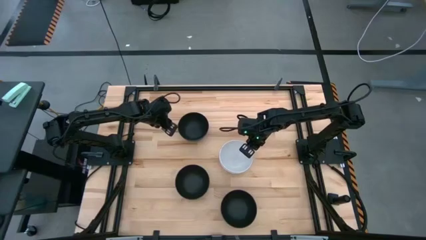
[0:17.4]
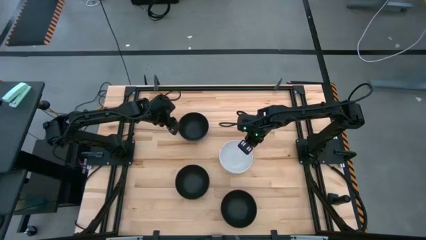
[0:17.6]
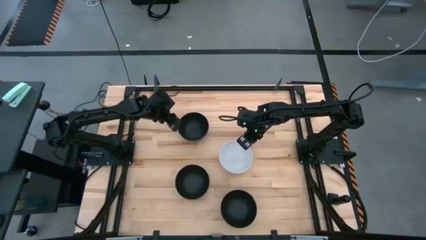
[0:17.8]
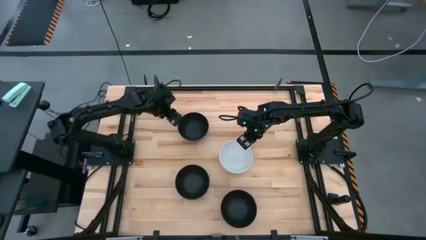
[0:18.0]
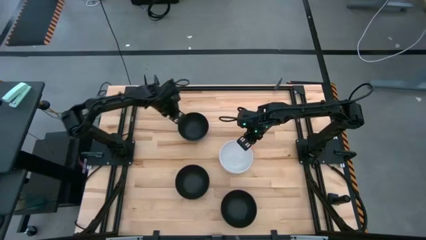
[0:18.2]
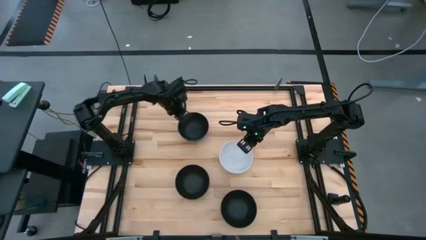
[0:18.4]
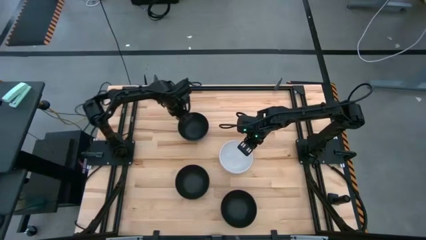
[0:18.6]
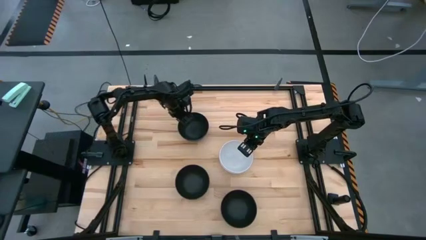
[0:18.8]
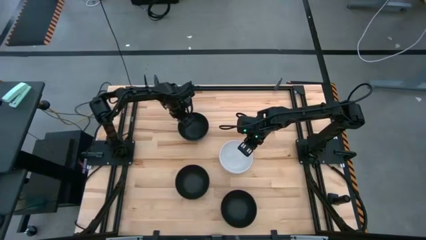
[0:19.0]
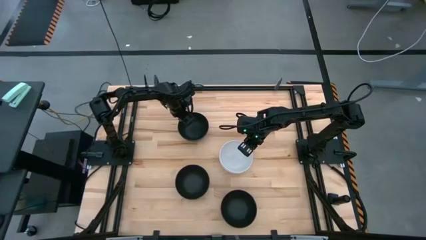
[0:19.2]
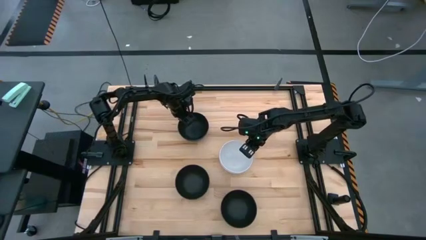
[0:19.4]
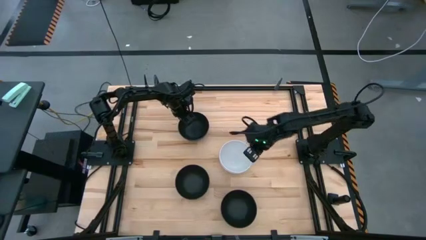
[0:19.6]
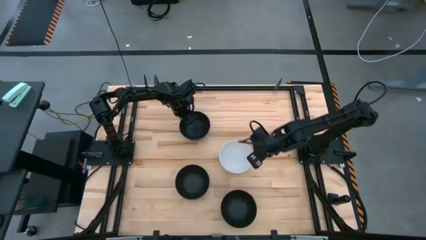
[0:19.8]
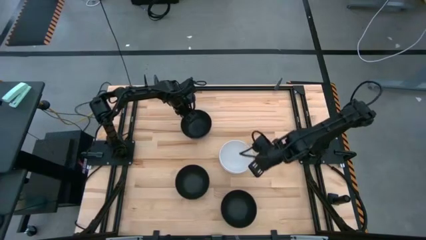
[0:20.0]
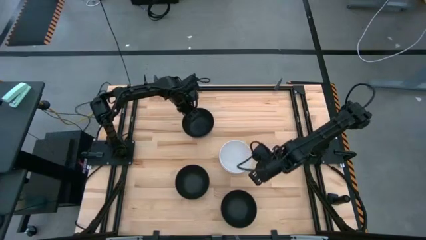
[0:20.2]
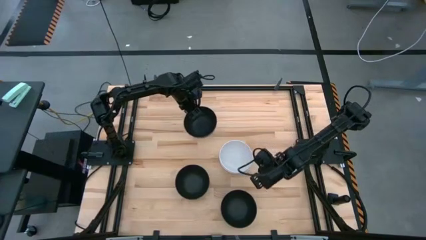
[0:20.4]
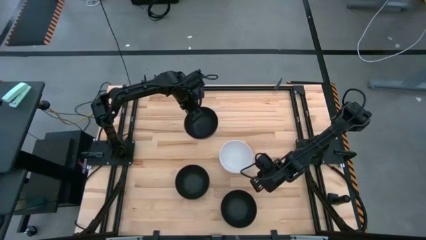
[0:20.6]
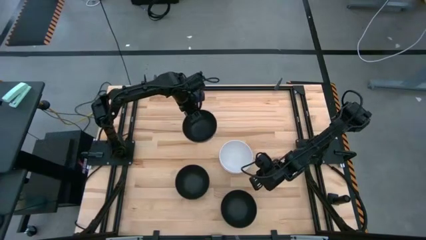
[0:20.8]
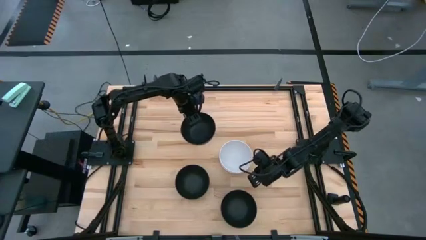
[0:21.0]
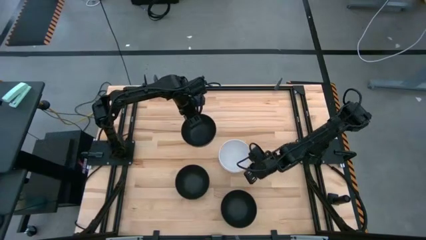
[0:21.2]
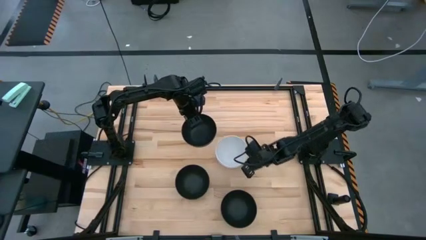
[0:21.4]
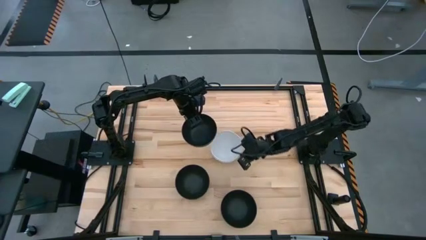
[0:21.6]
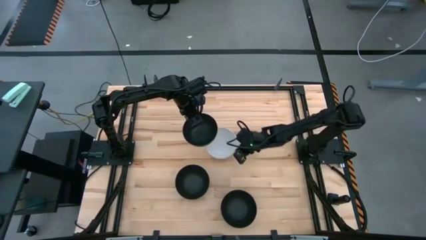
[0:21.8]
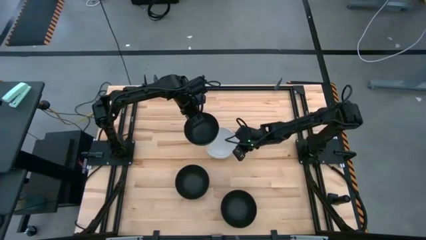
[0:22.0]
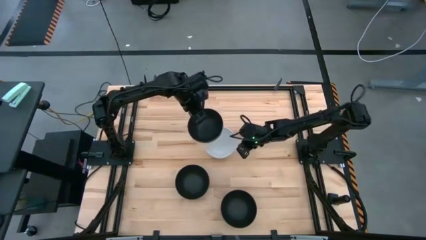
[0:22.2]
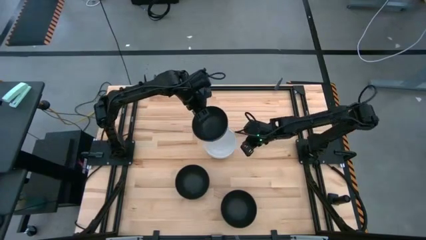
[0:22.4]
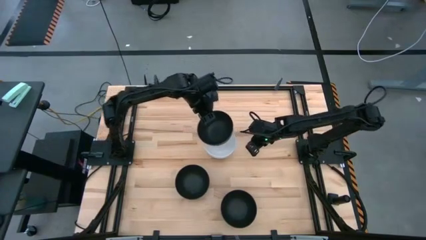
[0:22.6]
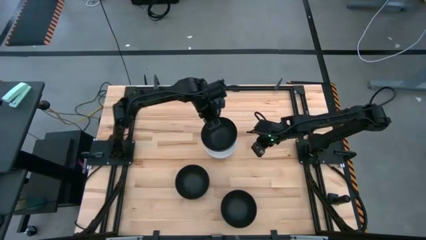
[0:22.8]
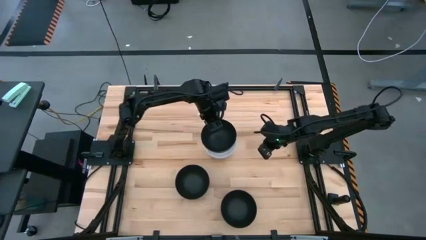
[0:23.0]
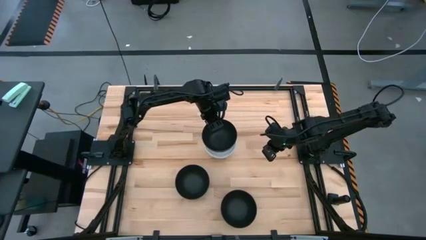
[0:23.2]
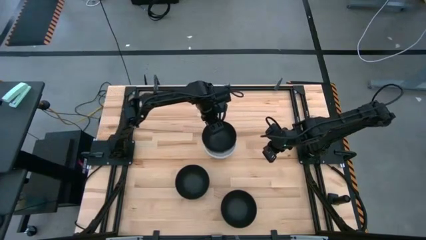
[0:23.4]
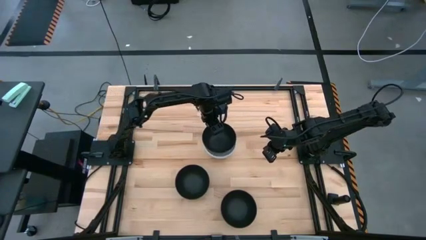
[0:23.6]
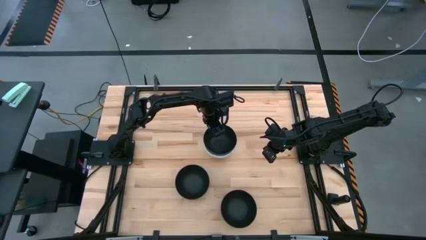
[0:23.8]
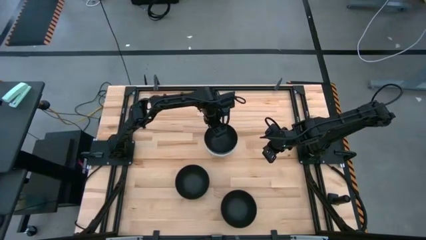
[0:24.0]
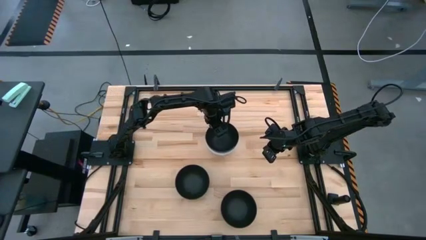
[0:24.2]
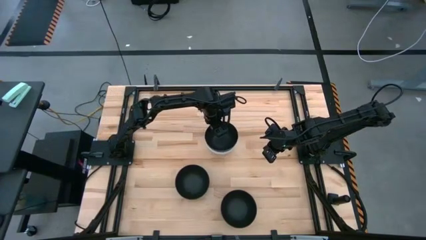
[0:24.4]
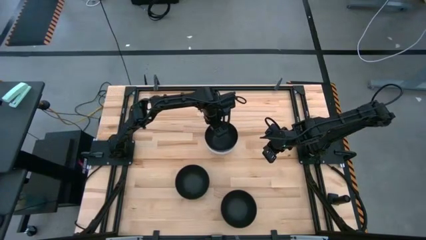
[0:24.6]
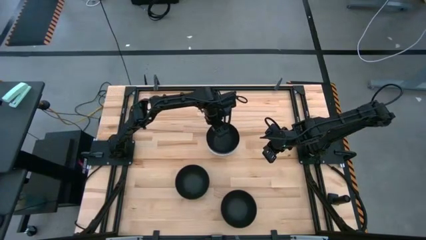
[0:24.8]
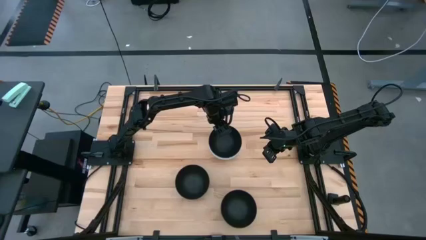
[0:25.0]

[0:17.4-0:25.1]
Task: Nest bowls inside each other
Stack the top left black bowl on the white bowl

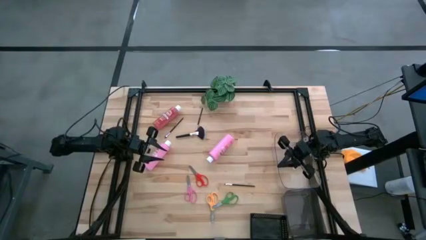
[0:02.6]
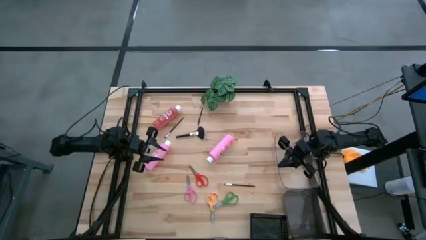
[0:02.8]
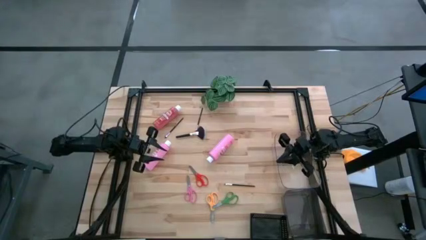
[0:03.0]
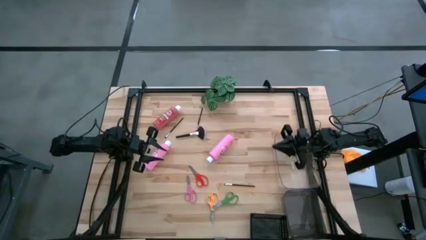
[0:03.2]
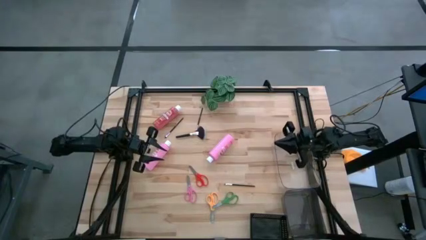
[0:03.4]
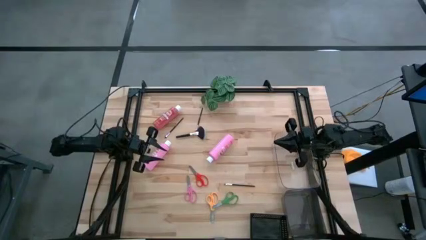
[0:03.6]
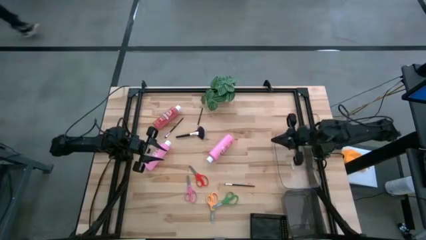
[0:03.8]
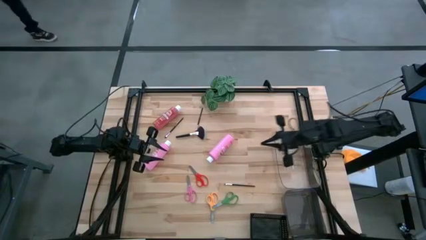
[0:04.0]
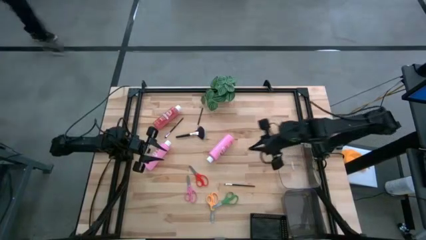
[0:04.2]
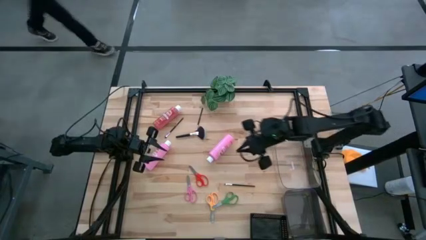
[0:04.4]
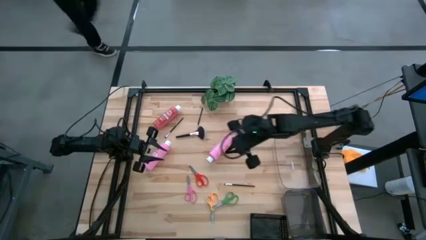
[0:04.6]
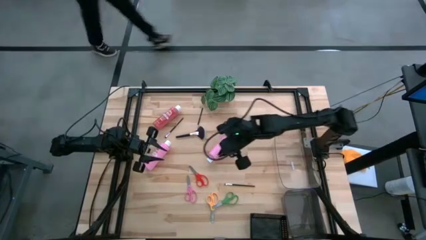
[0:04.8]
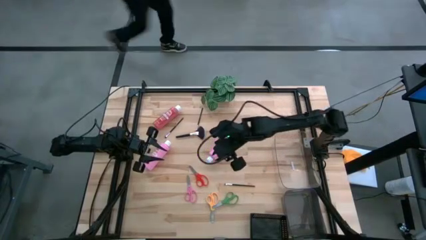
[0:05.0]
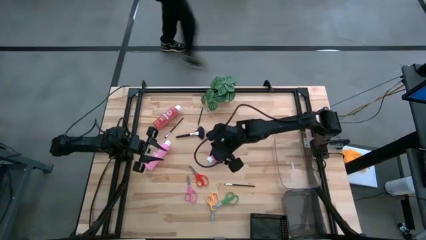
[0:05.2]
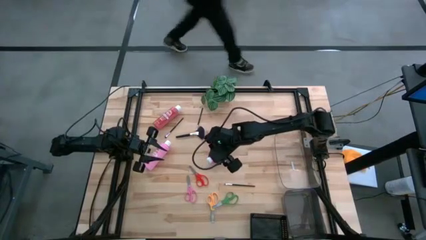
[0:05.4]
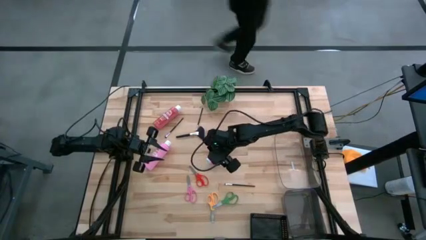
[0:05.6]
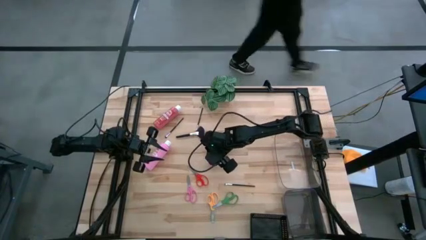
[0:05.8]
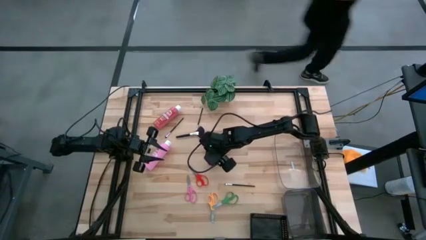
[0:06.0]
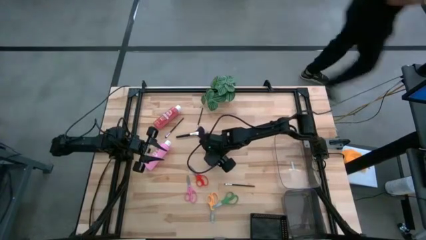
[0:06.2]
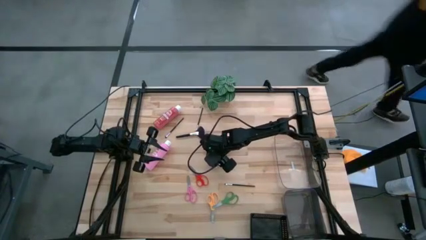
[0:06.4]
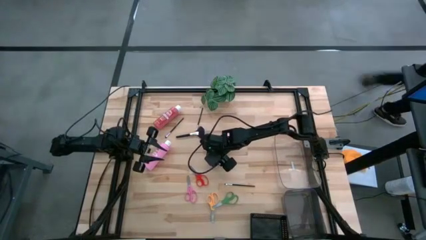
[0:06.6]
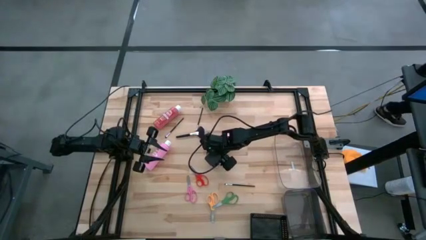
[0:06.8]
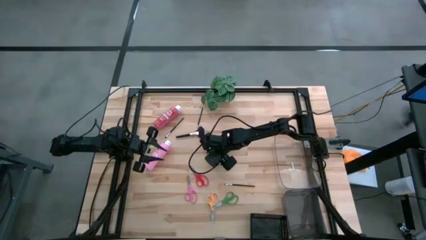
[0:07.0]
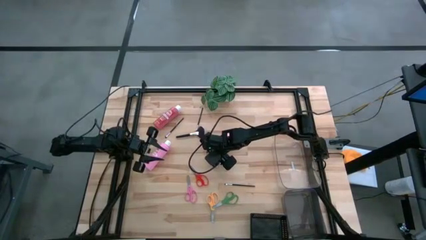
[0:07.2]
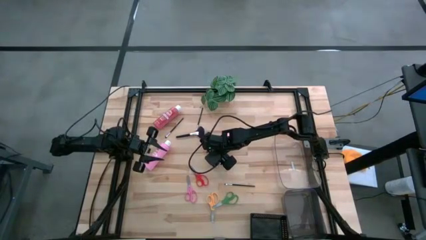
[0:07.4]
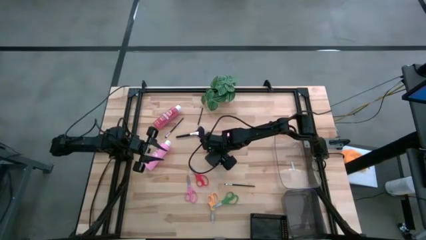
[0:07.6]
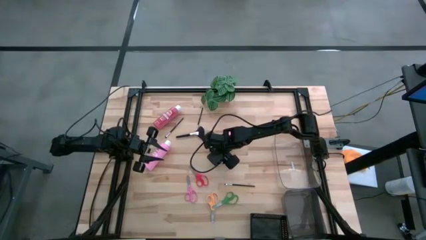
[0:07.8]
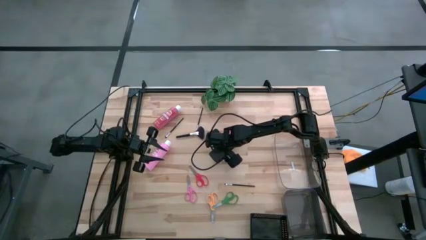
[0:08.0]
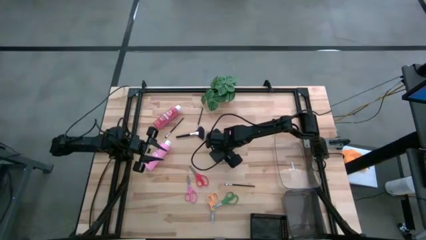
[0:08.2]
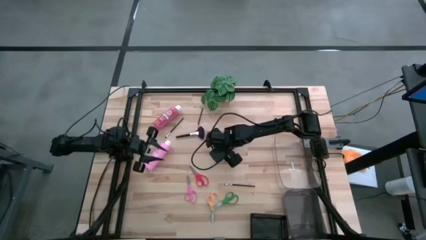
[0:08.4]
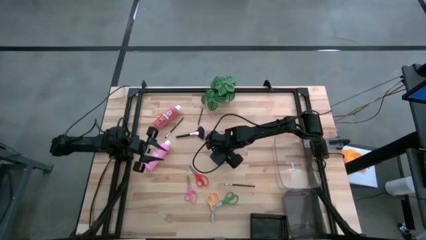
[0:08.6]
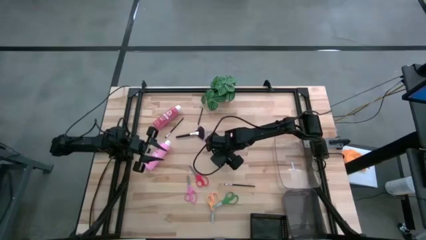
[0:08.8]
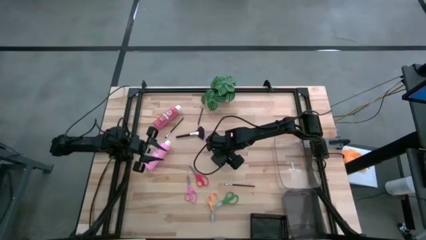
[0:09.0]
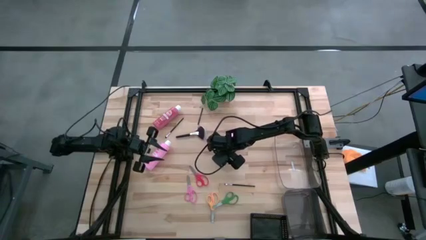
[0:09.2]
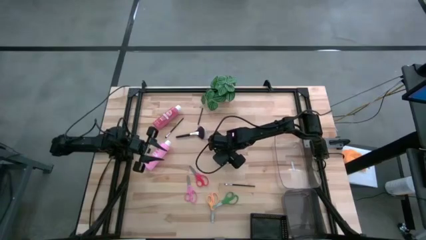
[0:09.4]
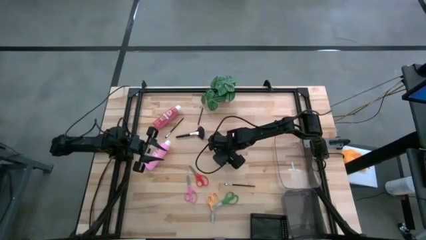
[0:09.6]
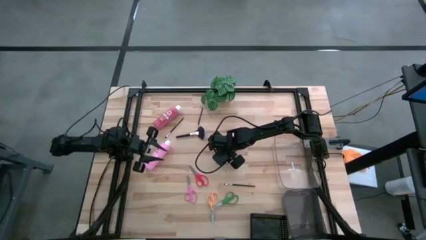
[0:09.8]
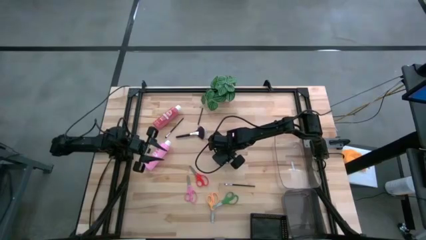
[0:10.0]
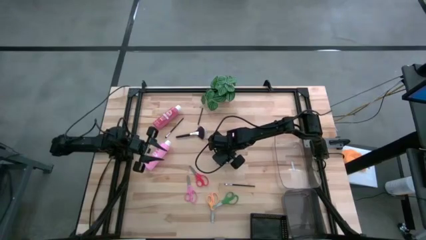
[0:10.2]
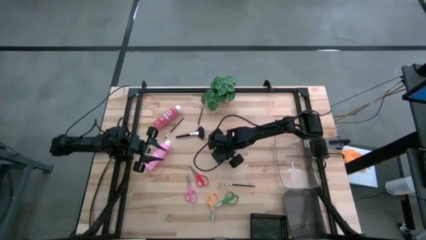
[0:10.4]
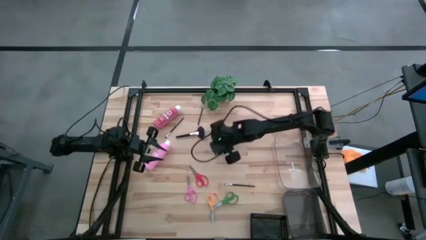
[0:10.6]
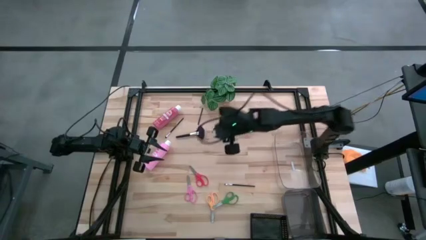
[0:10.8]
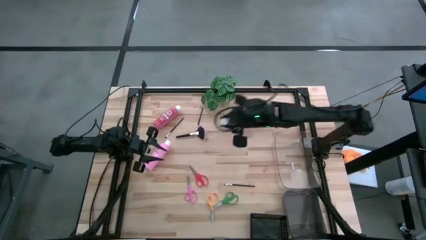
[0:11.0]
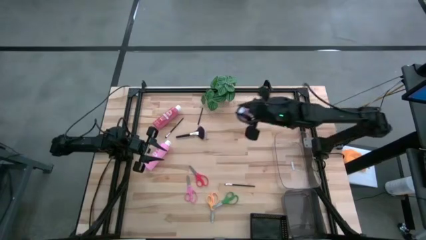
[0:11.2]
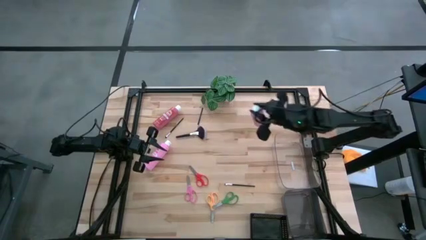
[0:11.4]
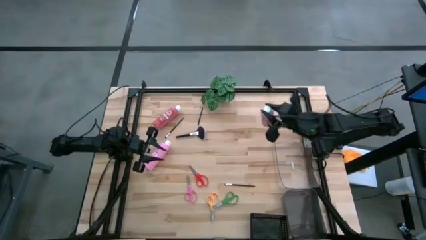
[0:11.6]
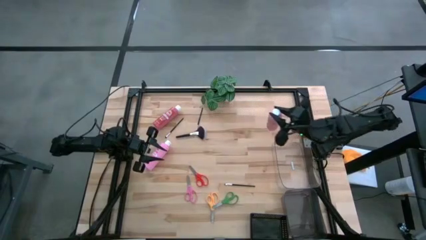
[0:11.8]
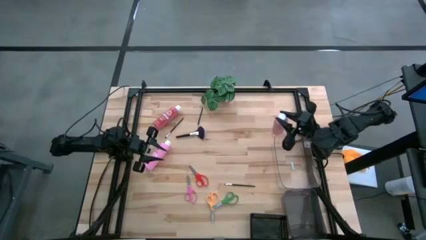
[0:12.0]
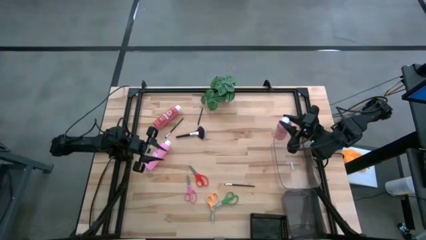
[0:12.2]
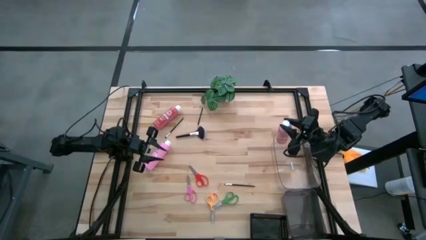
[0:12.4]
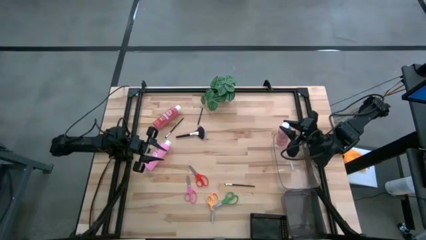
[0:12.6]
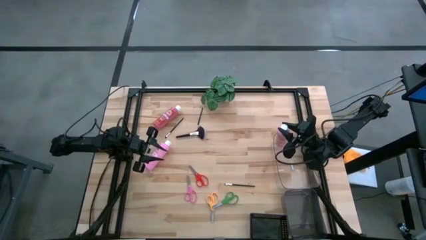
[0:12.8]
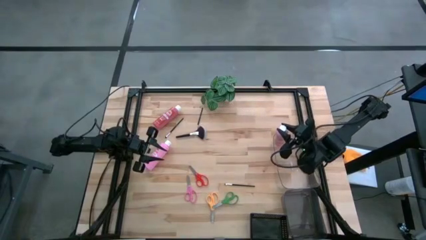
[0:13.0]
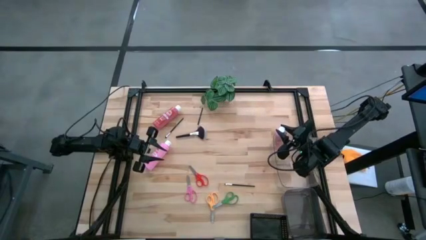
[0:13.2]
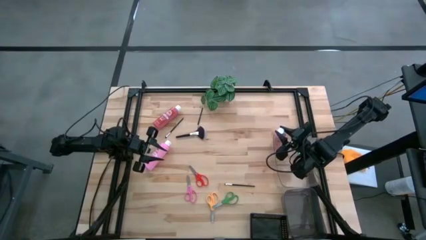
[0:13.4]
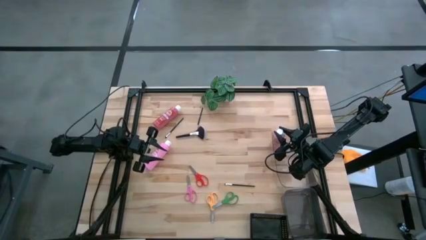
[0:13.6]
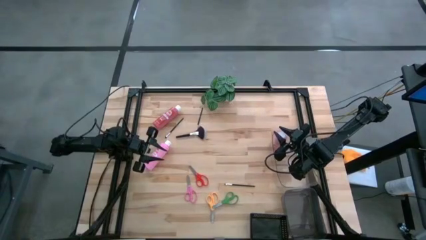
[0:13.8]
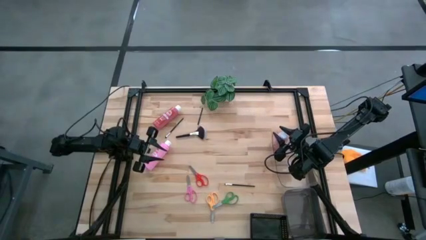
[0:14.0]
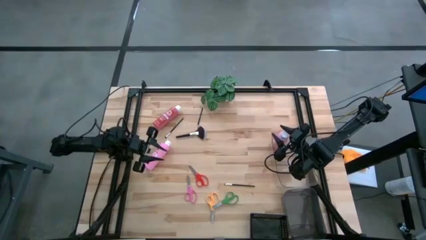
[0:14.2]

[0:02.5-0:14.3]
Task: Pick & Place Paint Supplies
Put the pink paint bottle into the transparent bin
